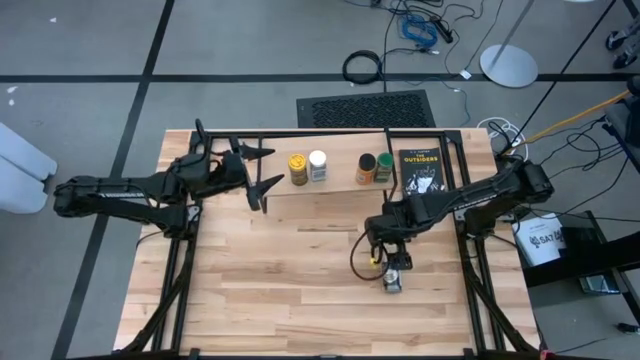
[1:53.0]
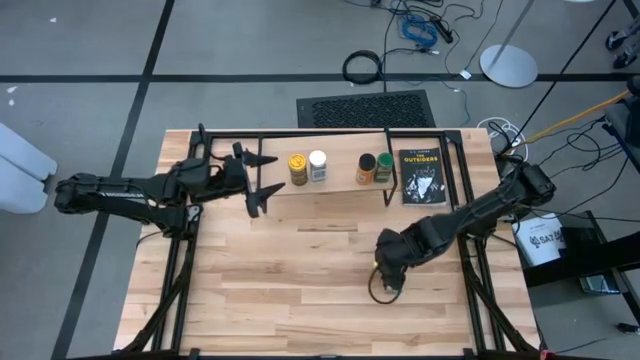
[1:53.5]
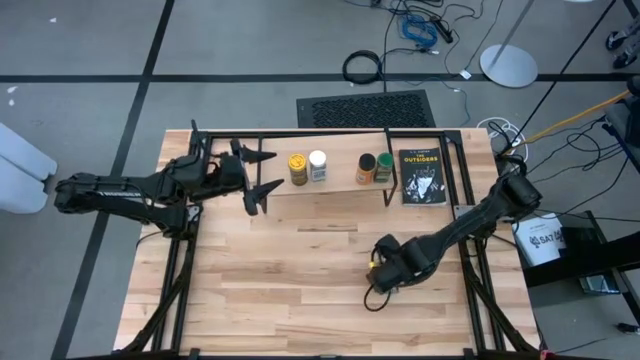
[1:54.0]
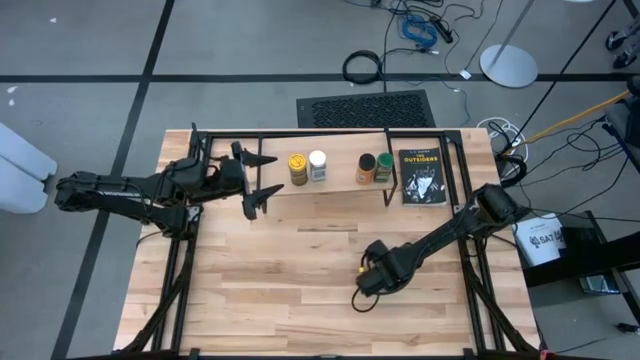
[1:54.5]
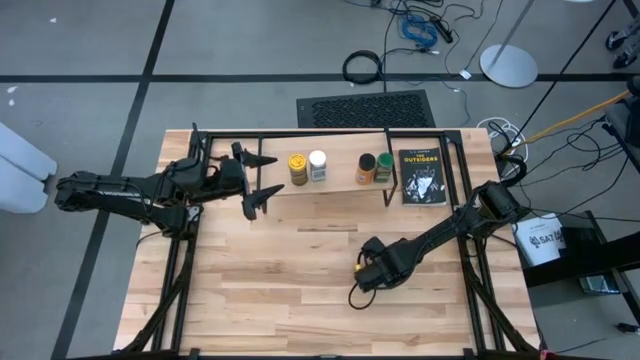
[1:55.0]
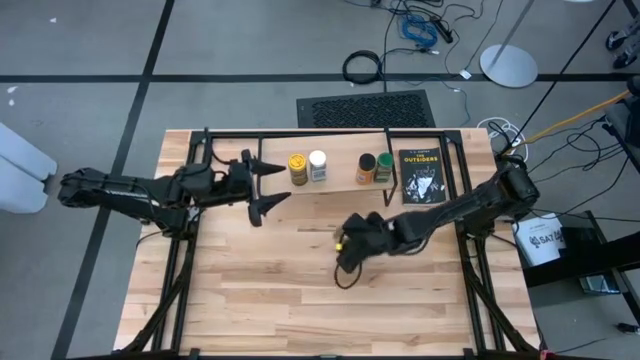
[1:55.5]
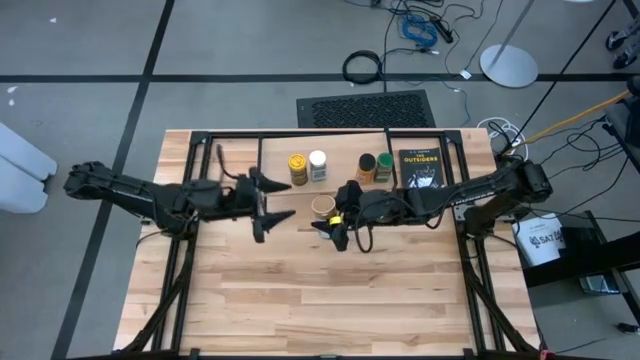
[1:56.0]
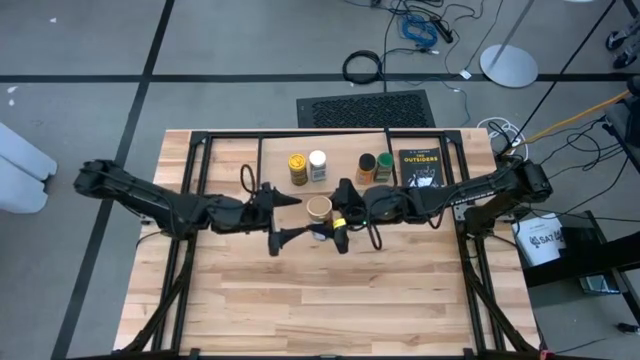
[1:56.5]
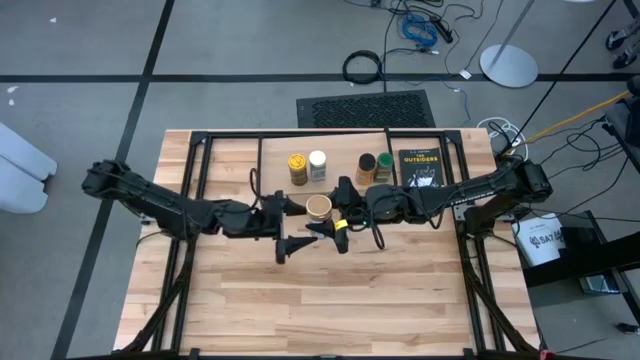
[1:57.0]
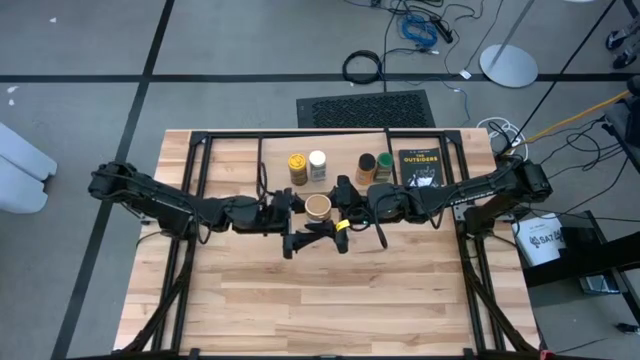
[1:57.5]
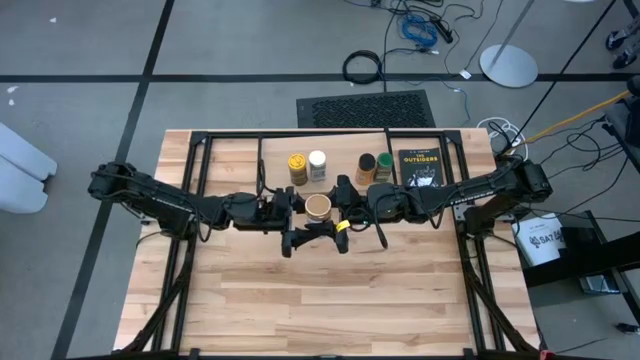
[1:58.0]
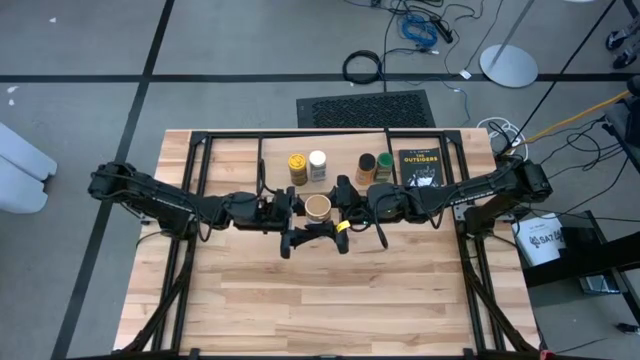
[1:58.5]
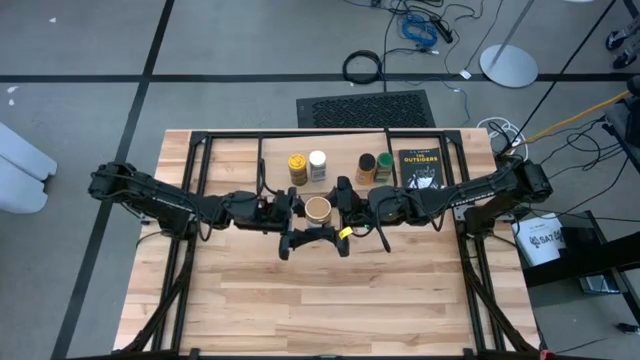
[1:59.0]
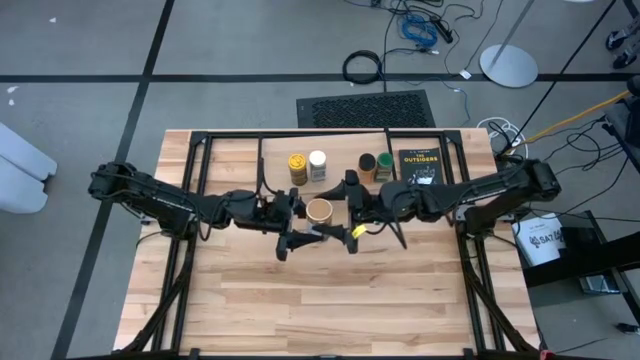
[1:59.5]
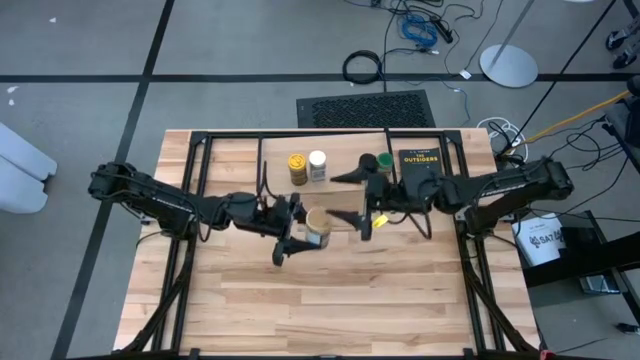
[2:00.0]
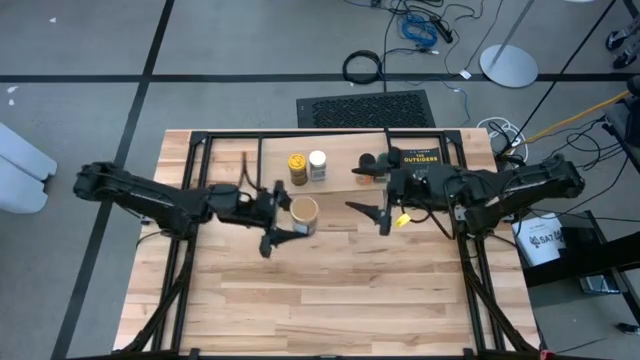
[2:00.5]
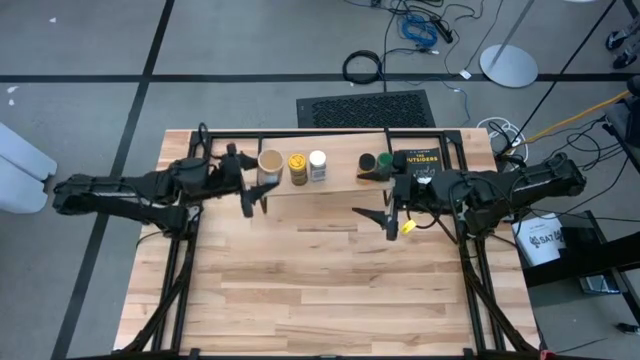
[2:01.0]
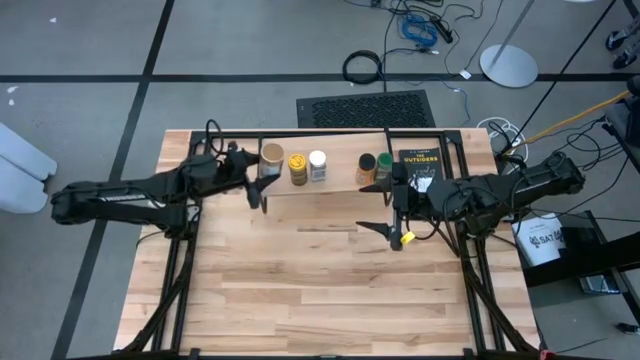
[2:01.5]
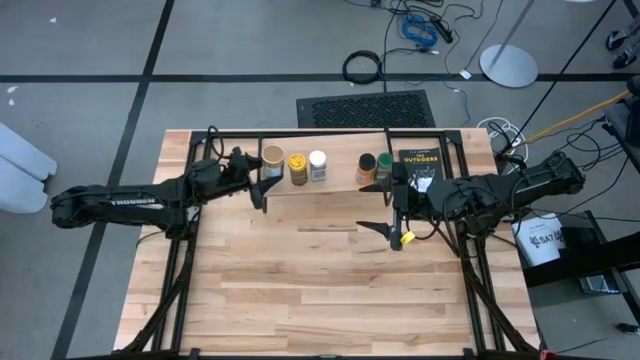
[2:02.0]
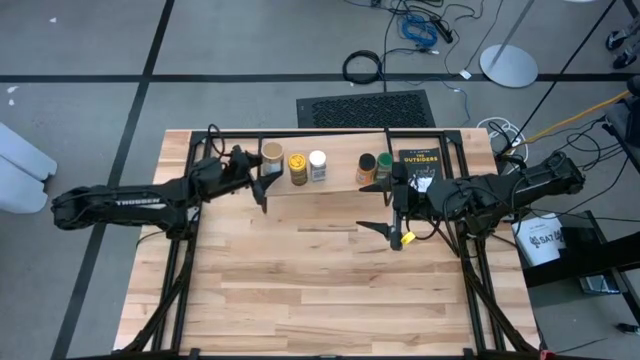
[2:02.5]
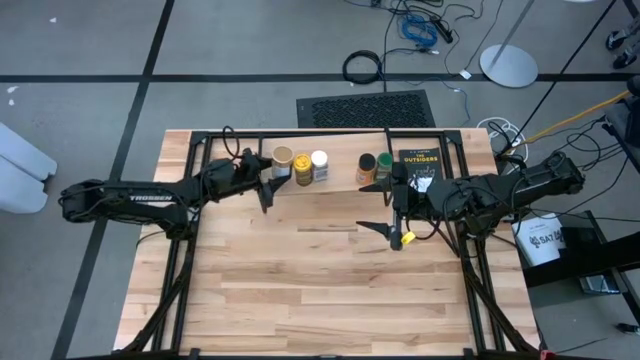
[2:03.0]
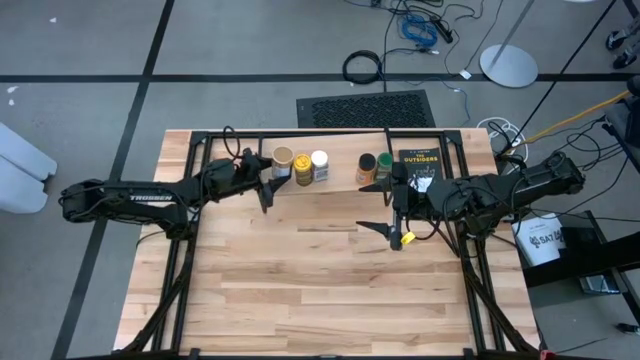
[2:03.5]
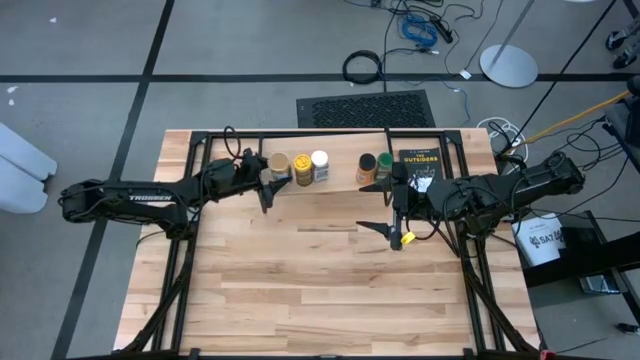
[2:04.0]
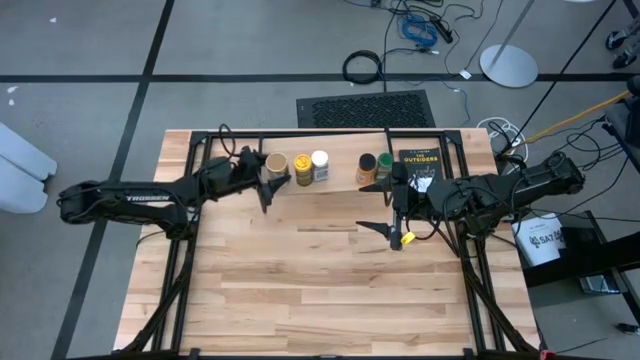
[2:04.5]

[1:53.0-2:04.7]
Task: Shelf spices
Put the golden seasoning bottle on the shelf

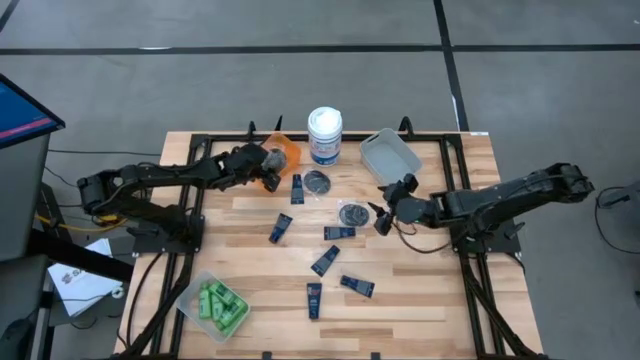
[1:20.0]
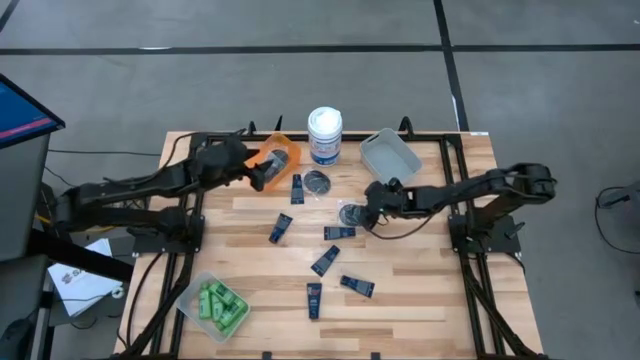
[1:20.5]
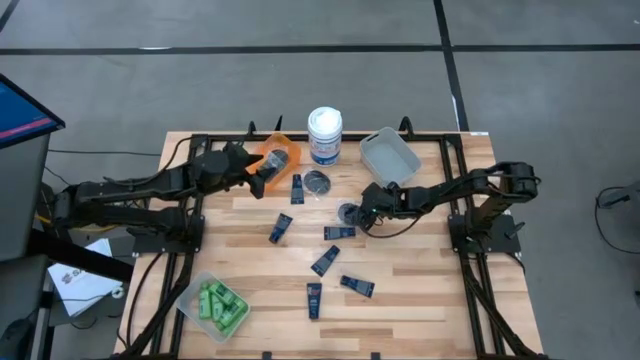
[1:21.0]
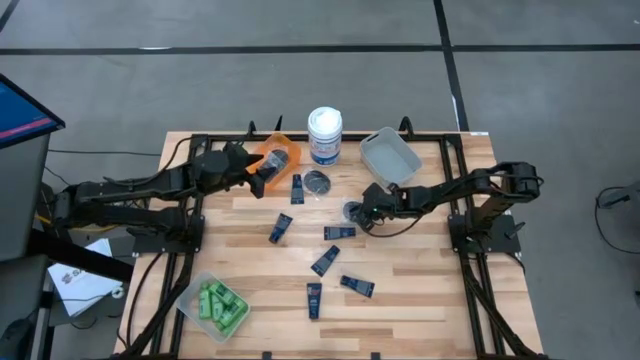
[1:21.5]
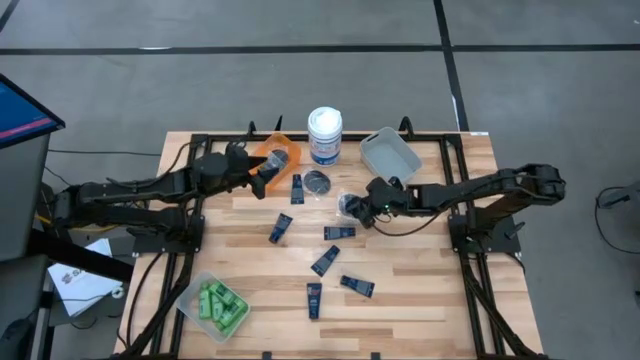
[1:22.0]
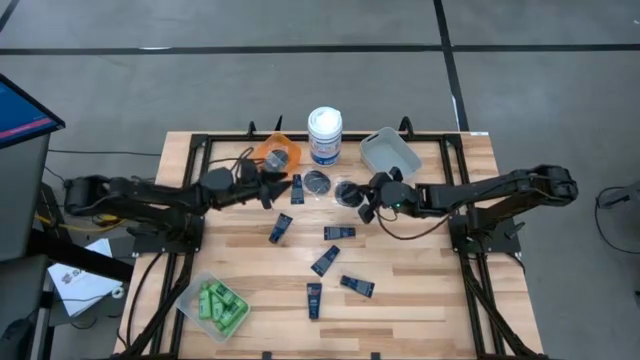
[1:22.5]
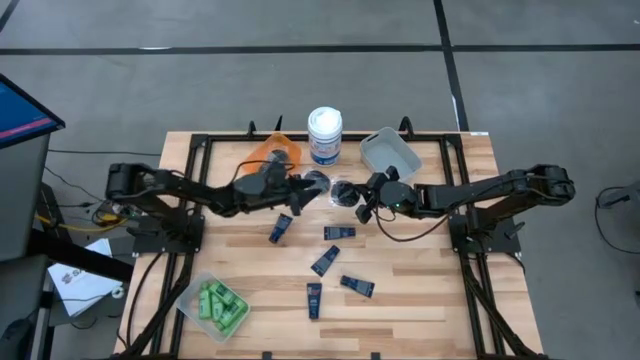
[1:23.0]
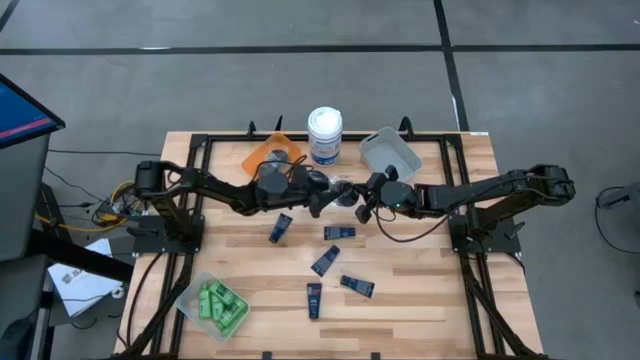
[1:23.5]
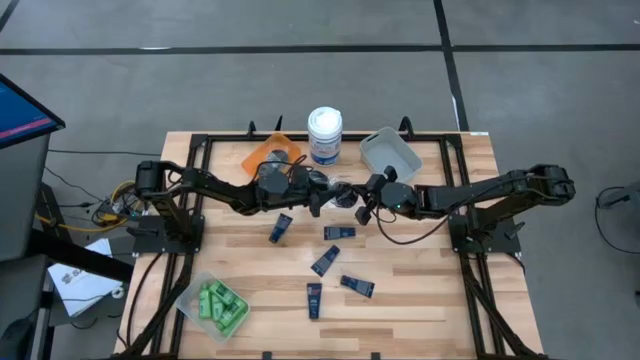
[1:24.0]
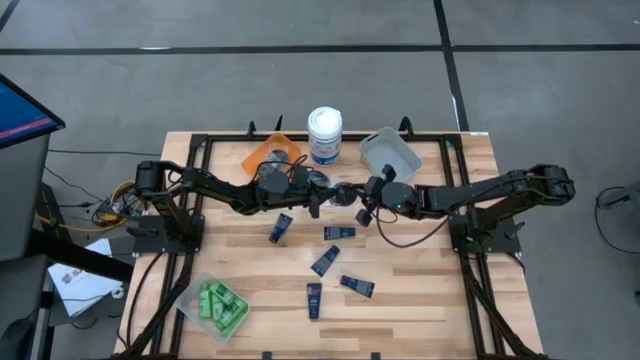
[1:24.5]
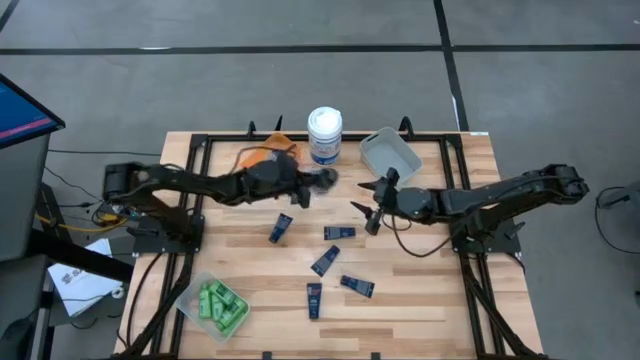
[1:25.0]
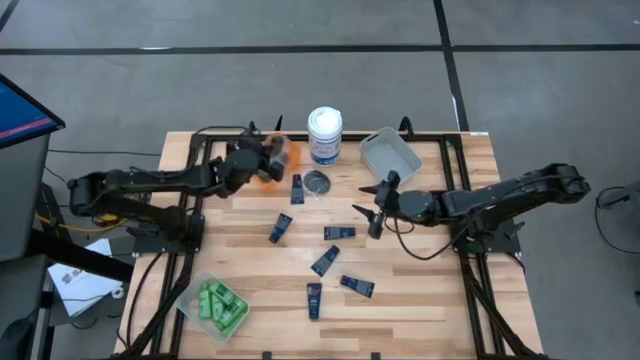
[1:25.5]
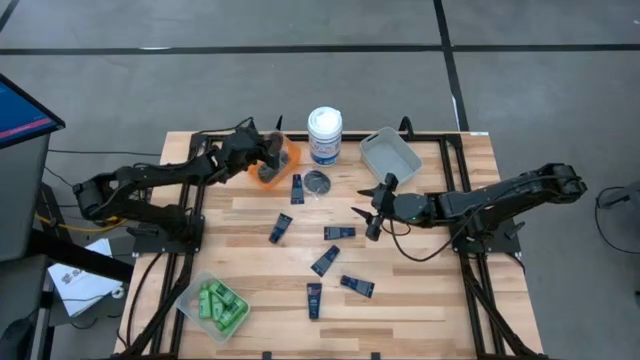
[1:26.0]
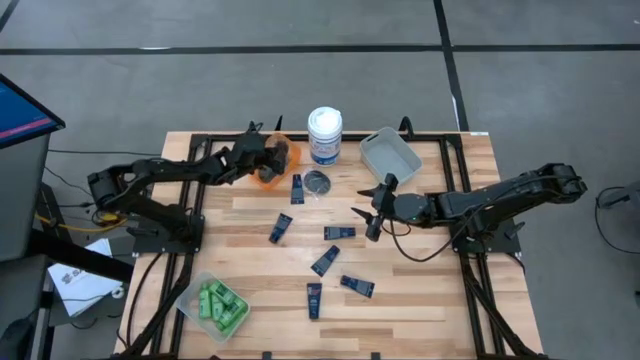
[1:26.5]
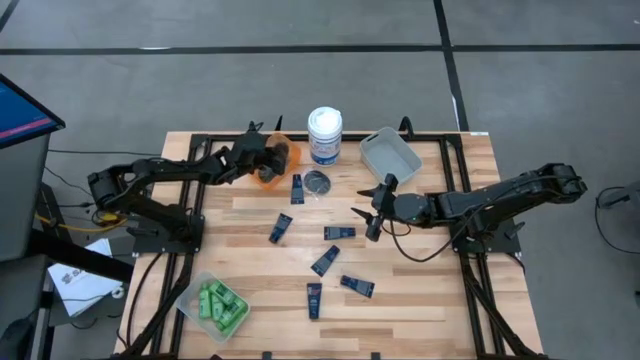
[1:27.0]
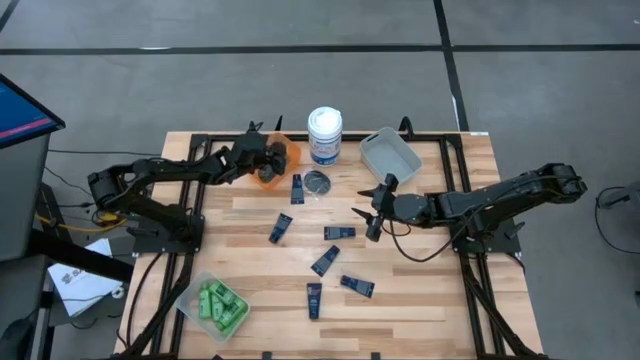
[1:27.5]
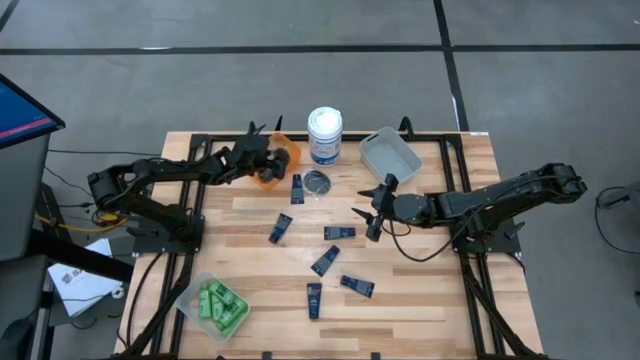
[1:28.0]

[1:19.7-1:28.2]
Task: Pick & Place Travel size toiletries
Put the hair brush into the orange bin
